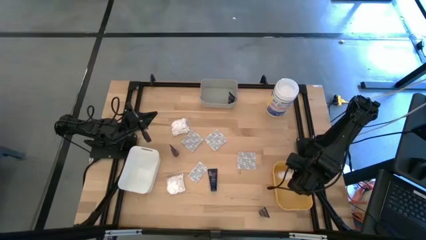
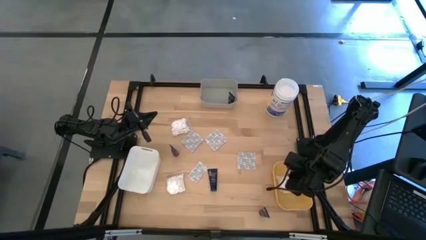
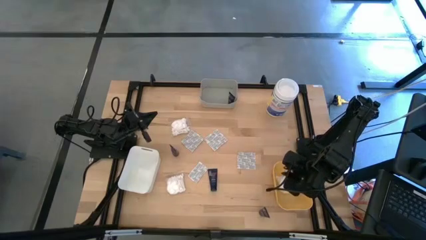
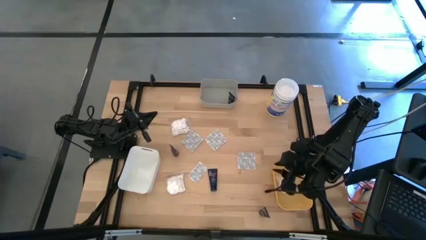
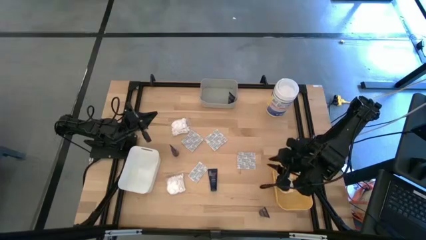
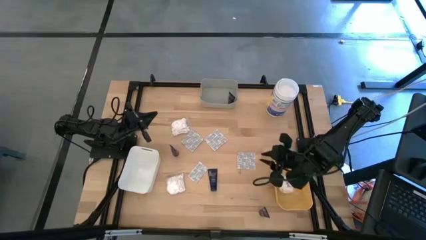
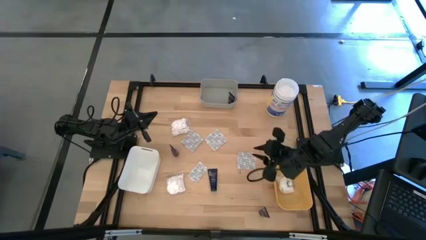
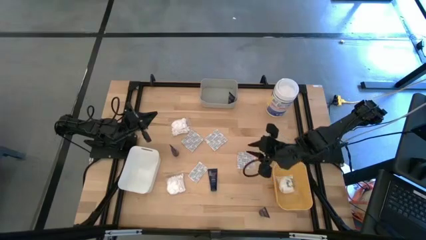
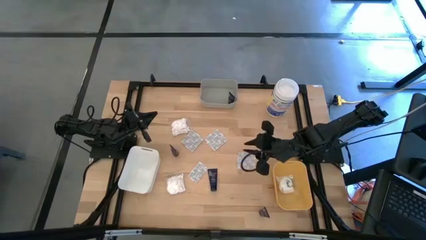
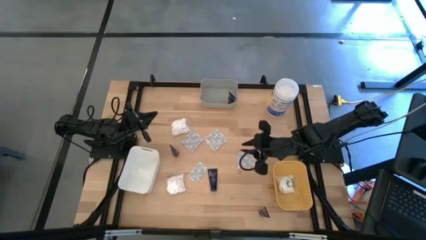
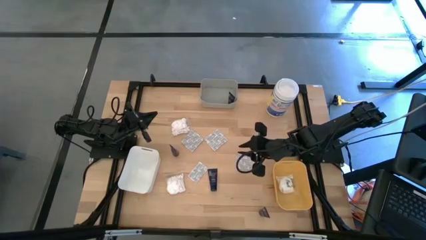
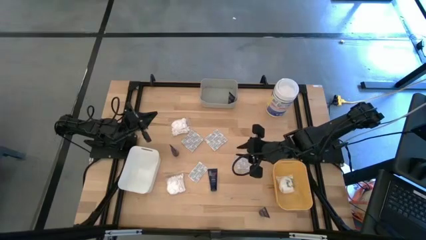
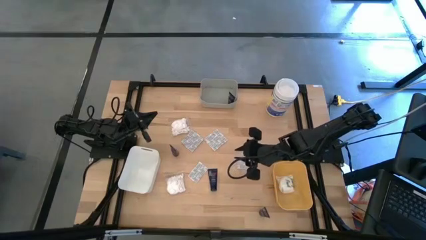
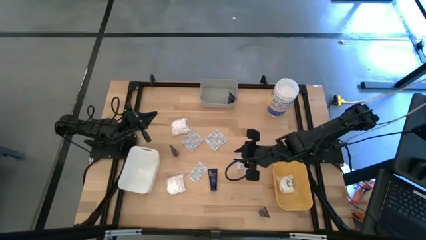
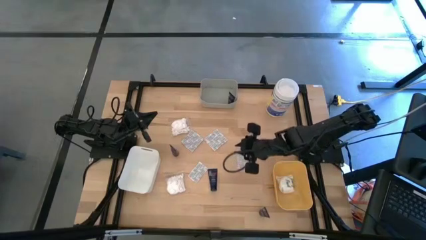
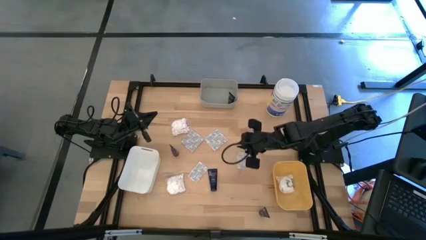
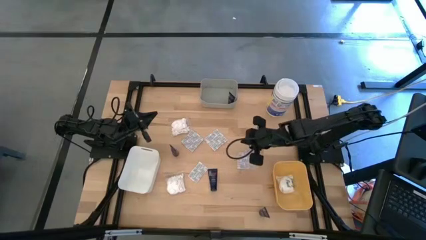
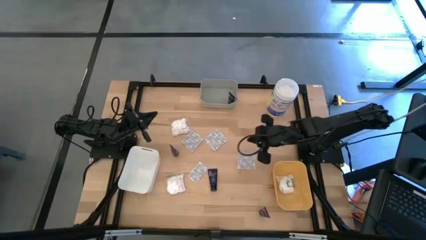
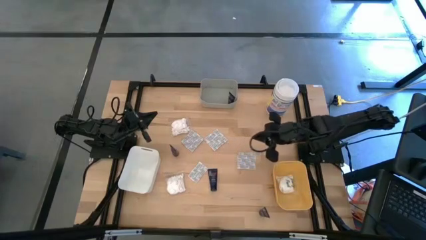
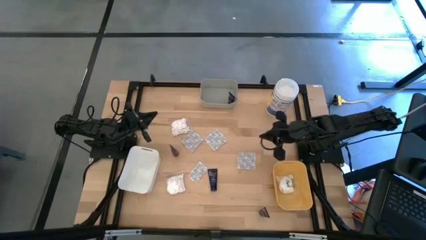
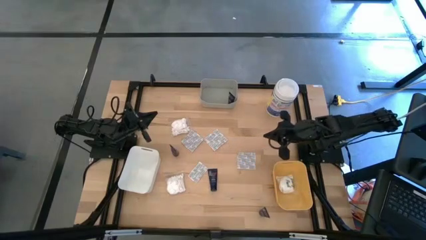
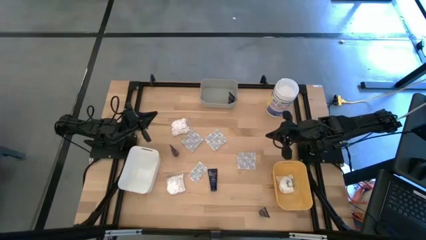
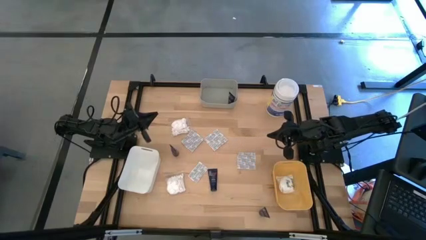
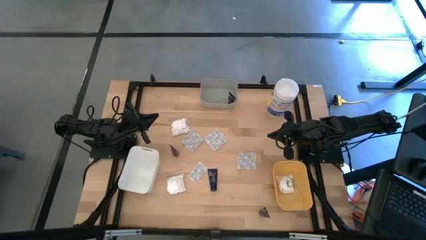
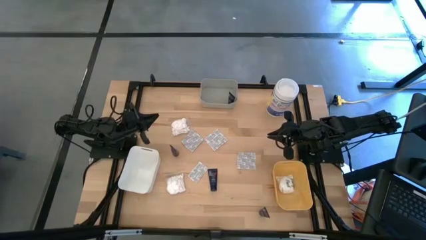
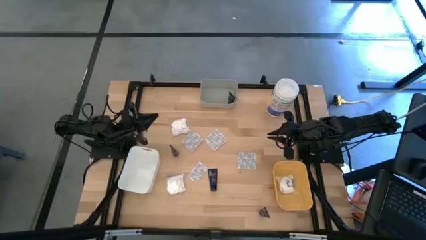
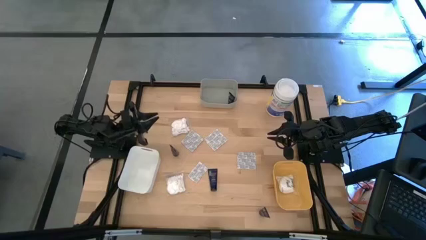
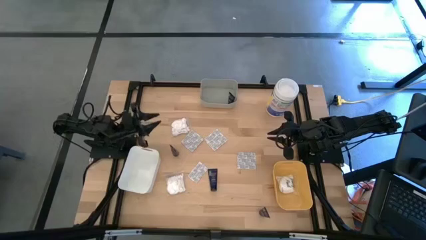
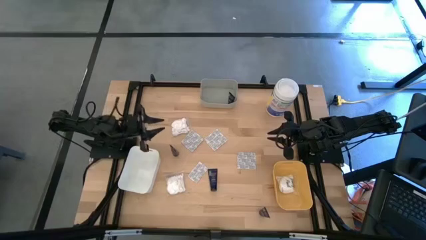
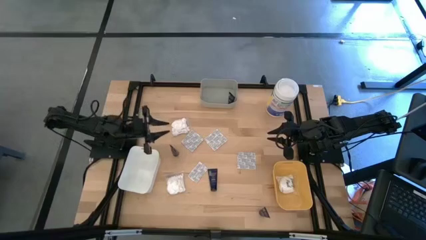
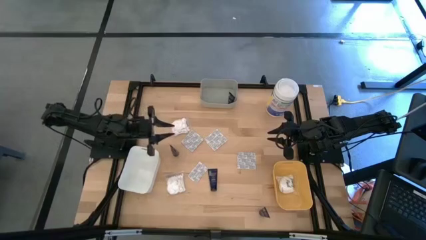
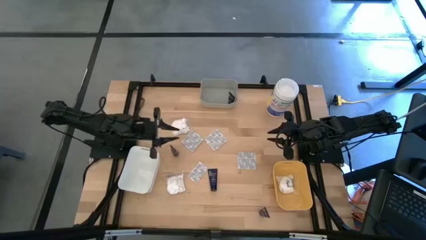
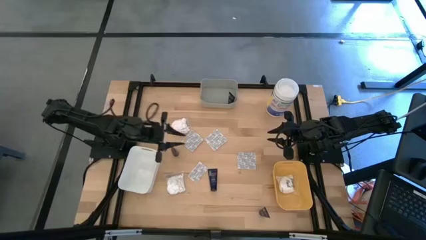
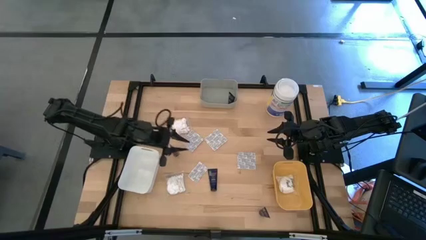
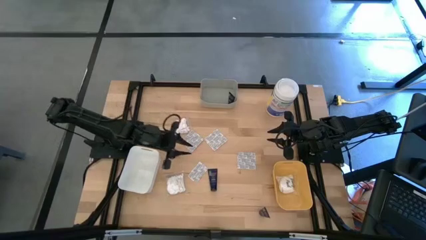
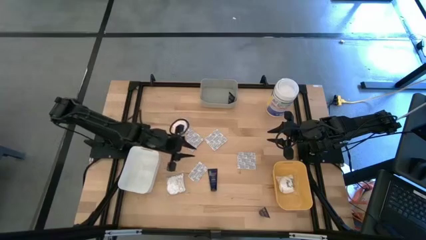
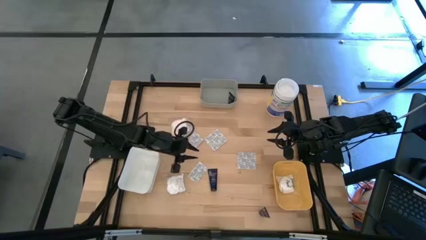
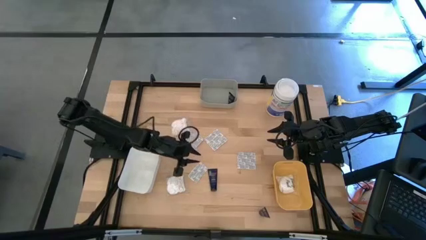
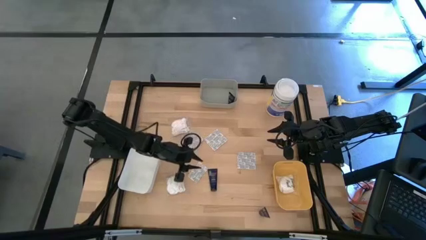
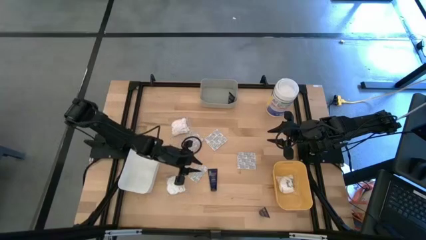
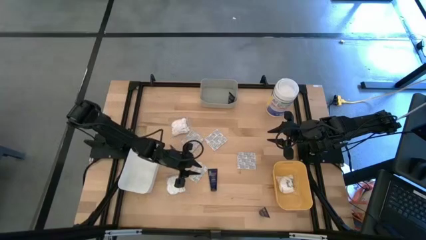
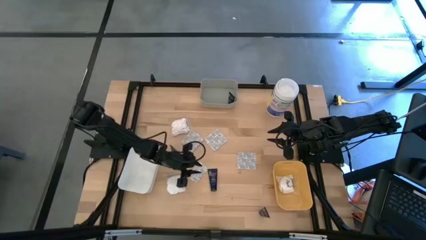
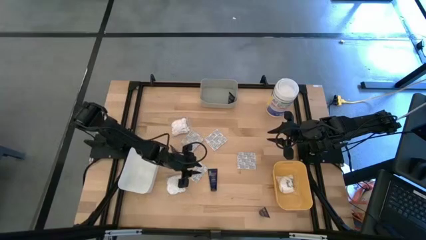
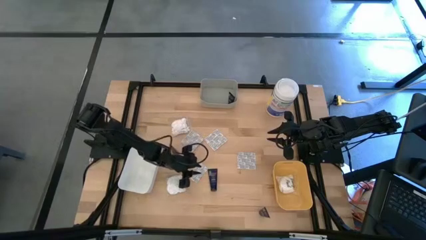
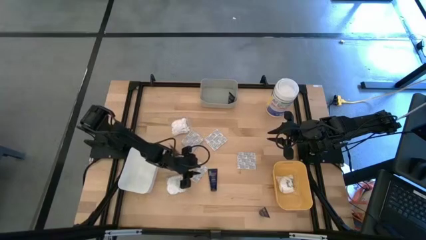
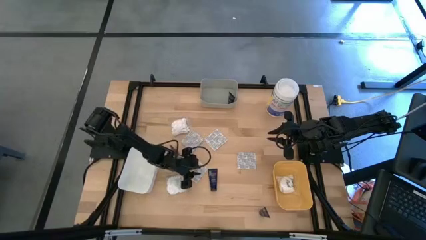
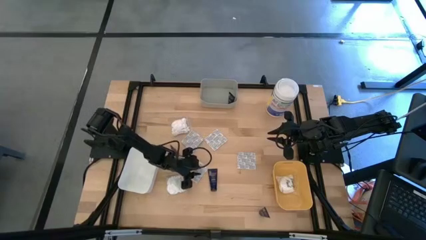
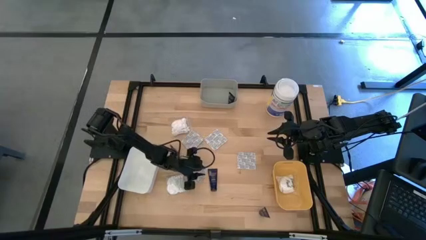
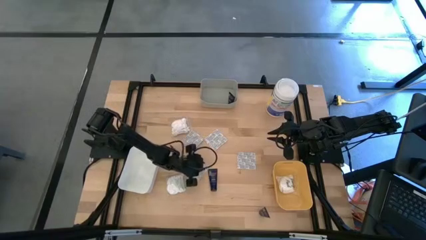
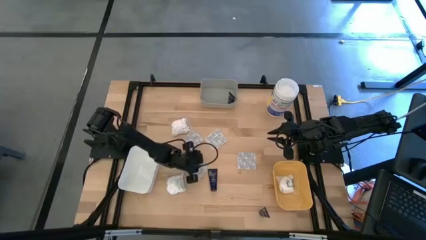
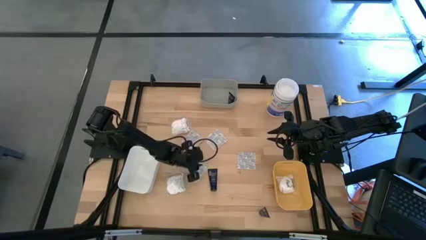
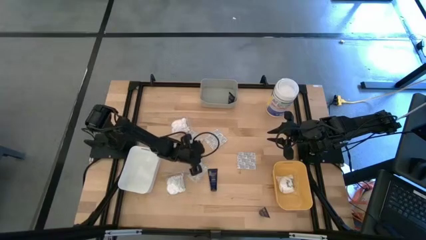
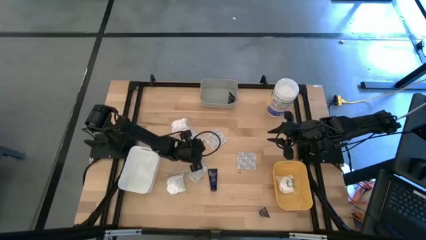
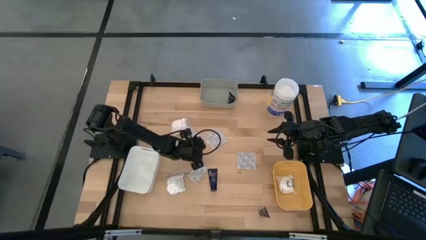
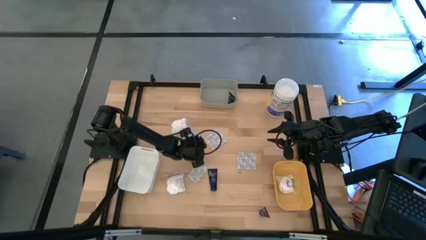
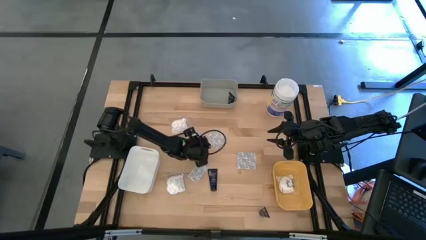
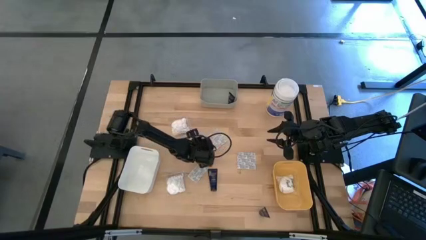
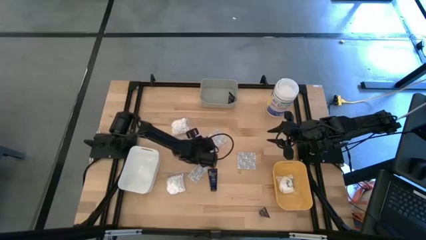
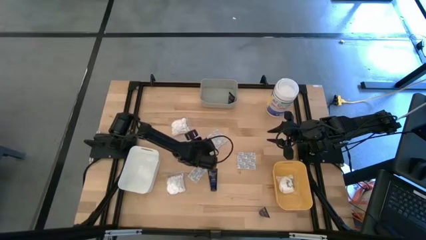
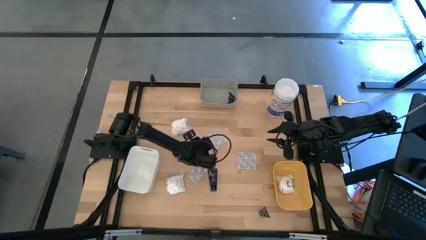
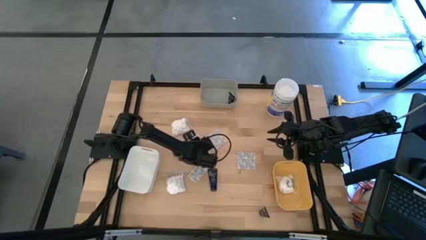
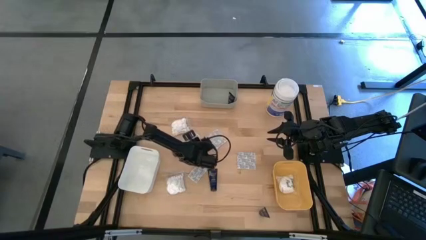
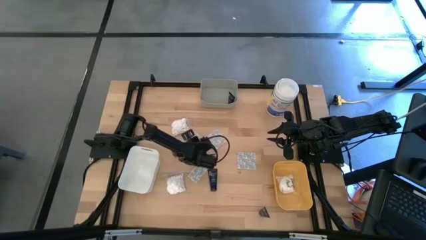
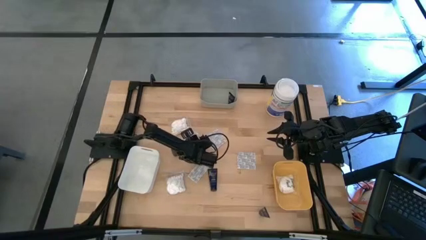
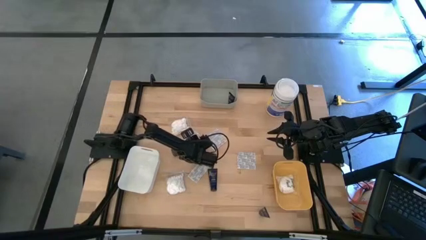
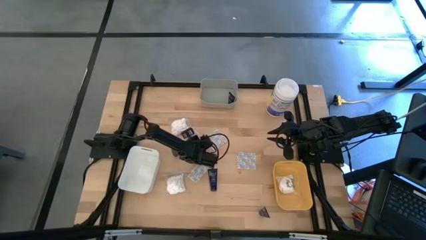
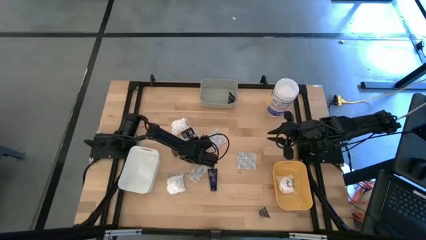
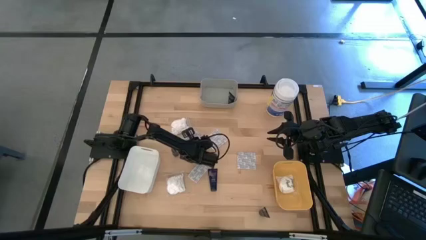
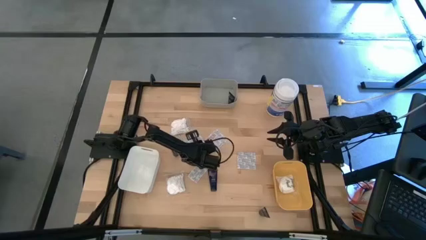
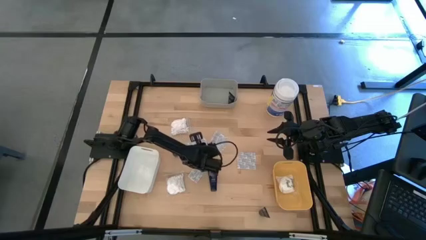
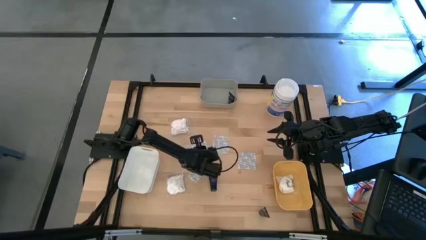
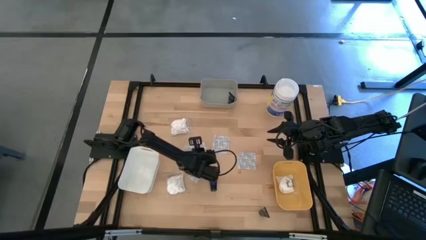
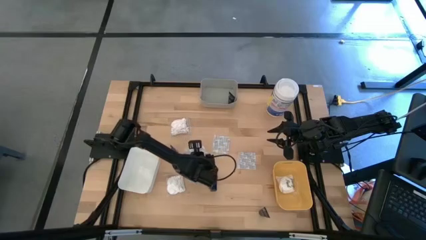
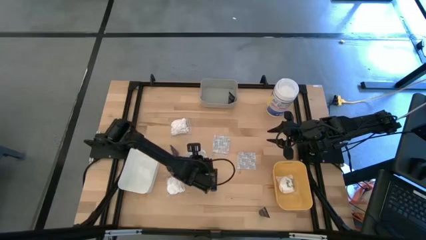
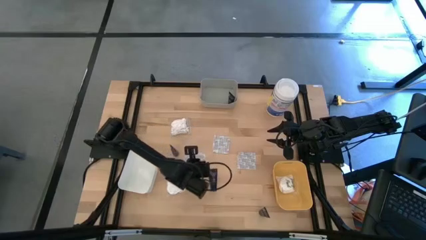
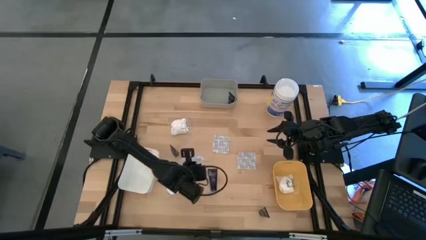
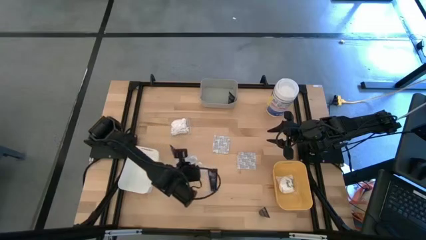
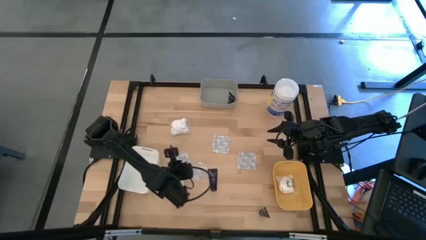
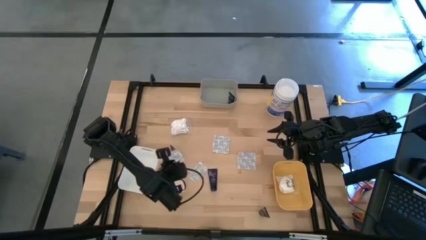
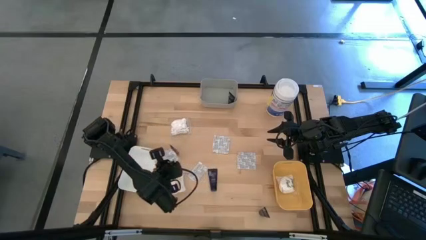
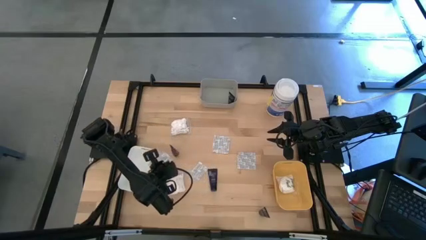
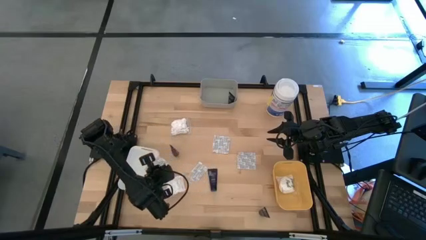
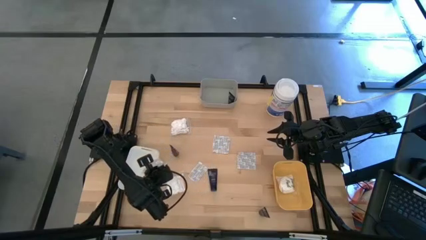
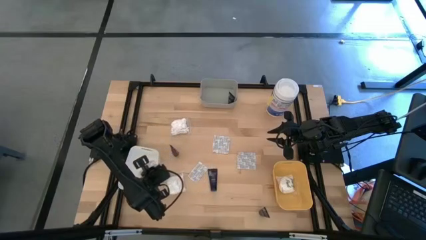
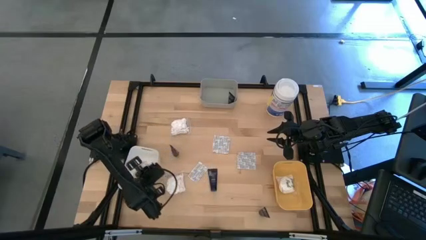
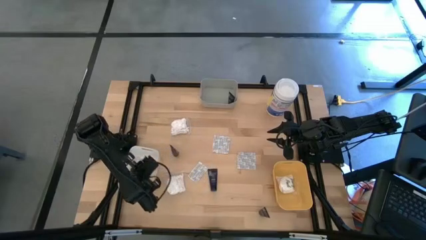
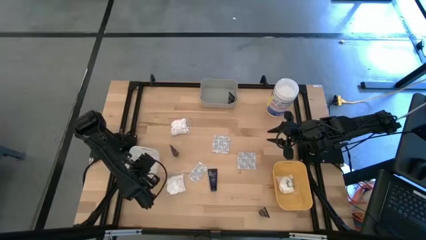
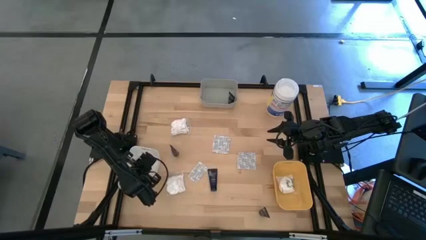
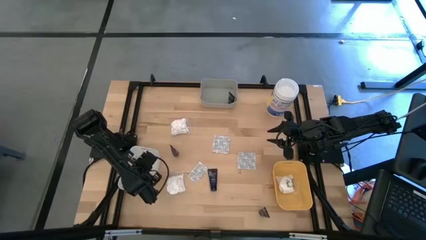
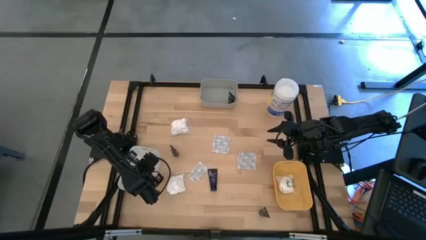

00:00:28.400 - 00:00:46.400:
Task: Pick & Place Travel size toiletries
Put the top left bandage into the white bin
